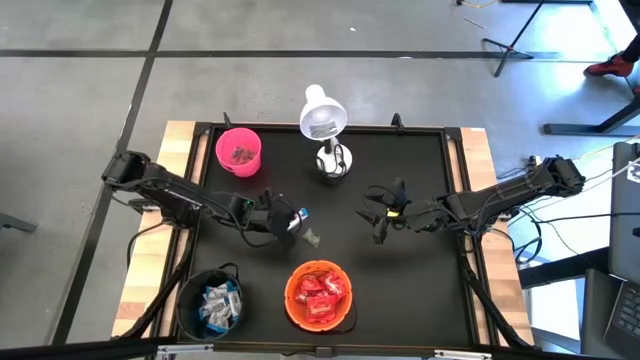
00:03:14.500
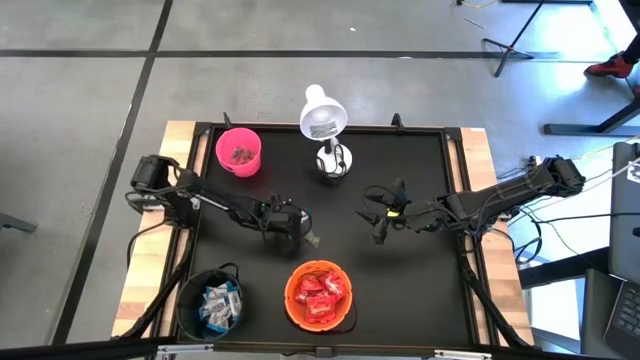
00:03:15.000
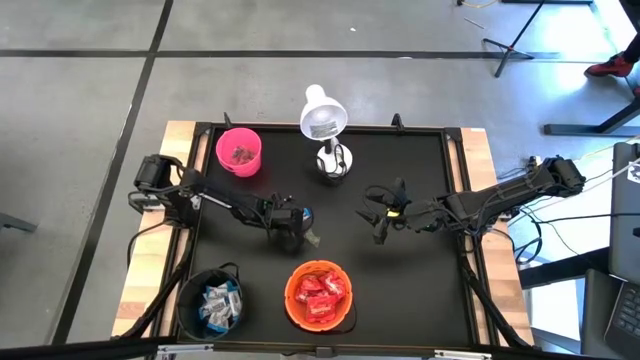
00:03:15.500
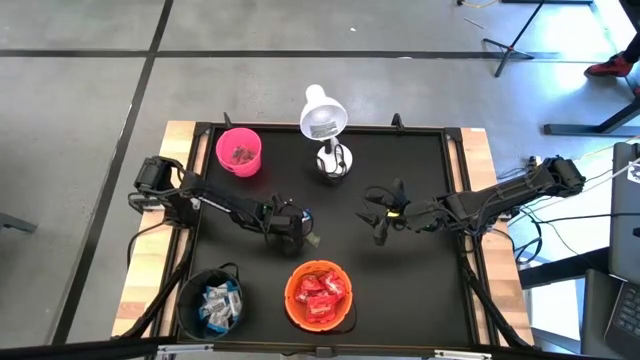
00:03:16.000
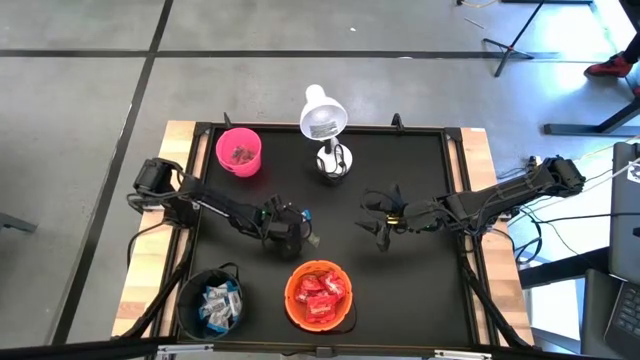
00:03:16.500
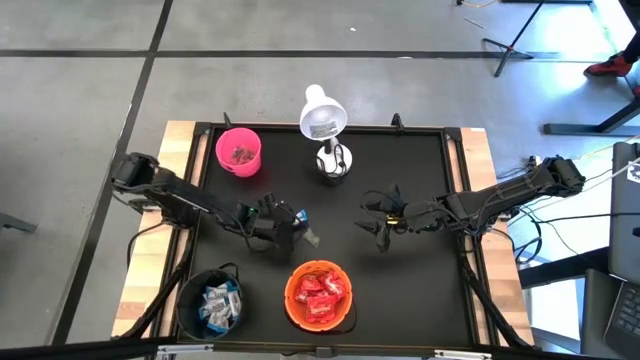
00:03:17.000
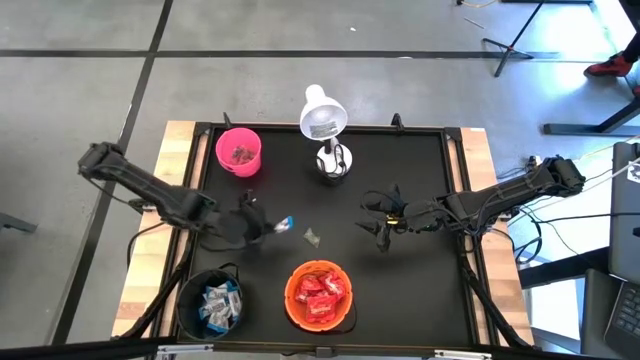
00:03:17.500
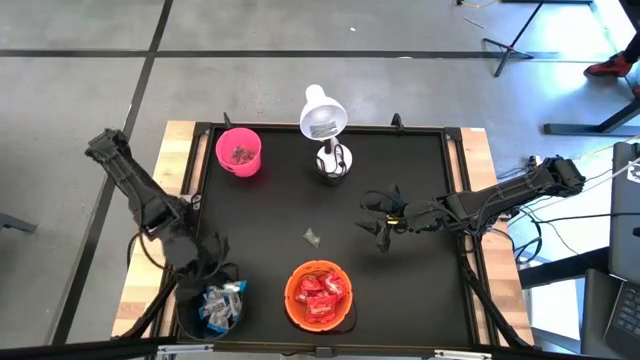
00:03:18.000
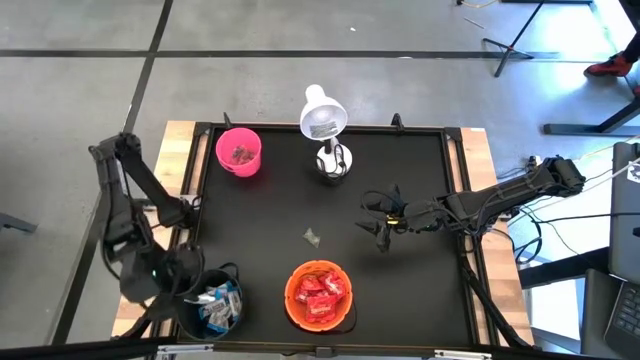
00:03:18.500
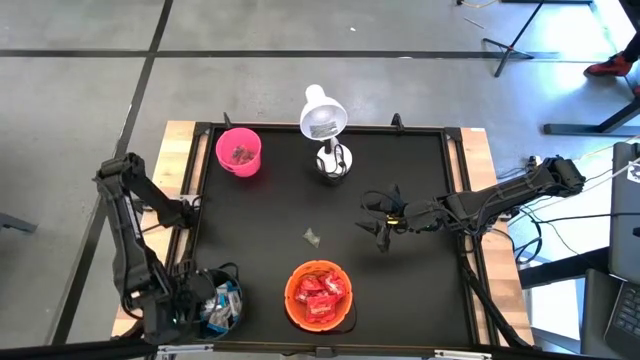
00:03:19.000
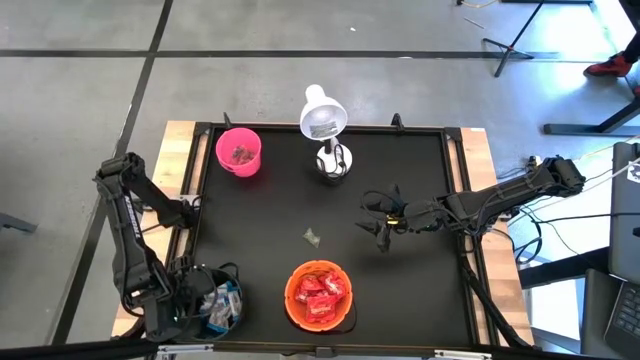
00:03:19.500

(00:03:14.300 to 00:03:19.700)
Task: Sort candy
Put the white candy into the black bucket

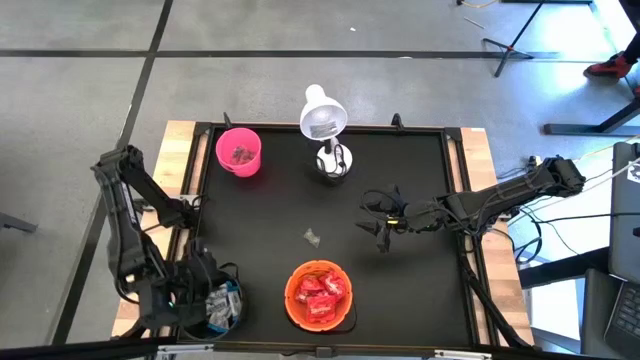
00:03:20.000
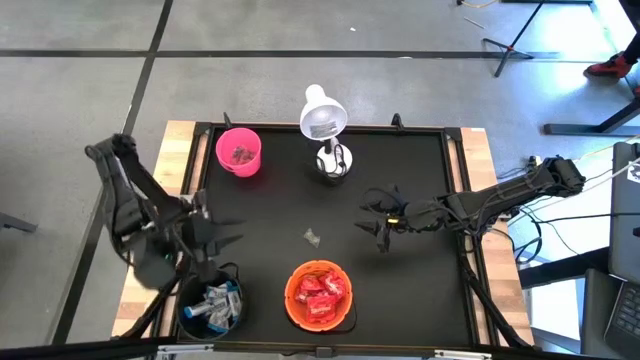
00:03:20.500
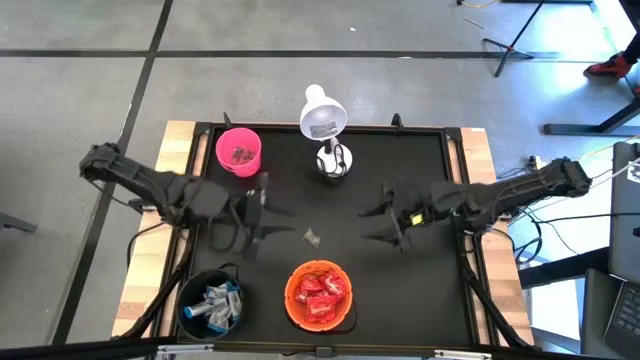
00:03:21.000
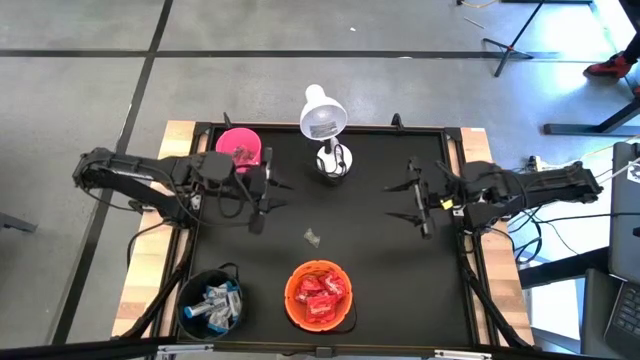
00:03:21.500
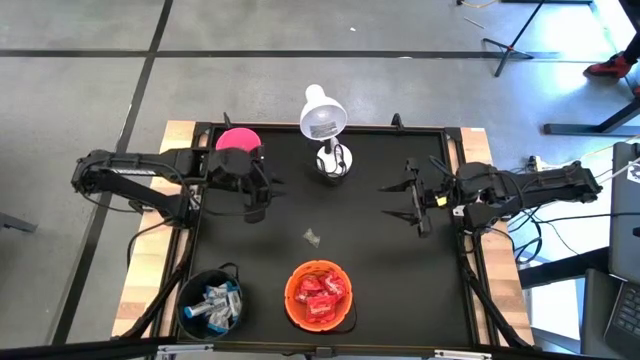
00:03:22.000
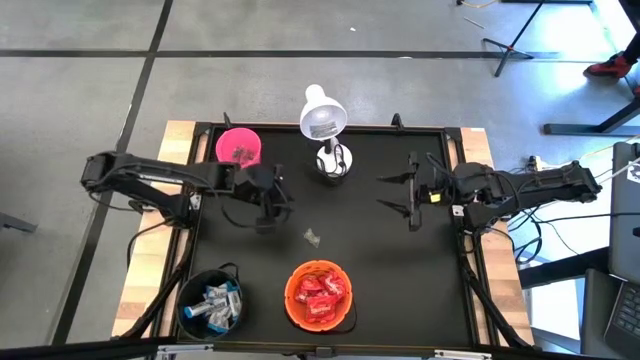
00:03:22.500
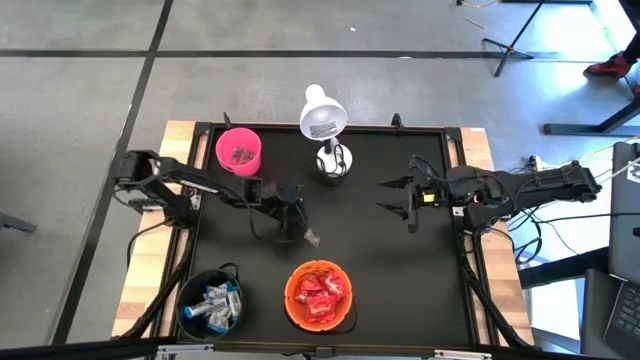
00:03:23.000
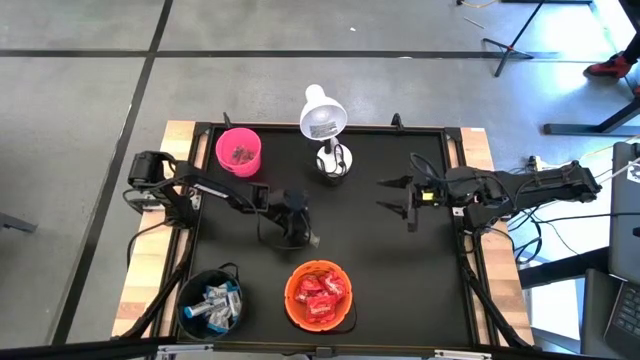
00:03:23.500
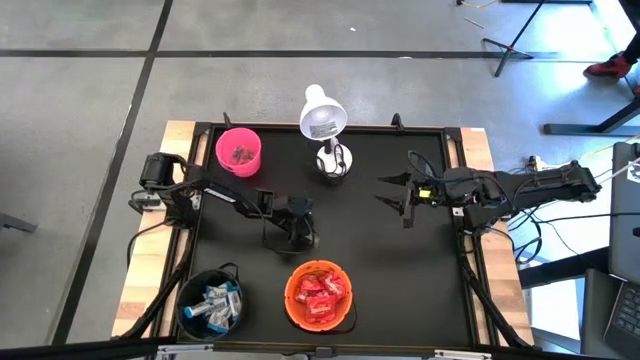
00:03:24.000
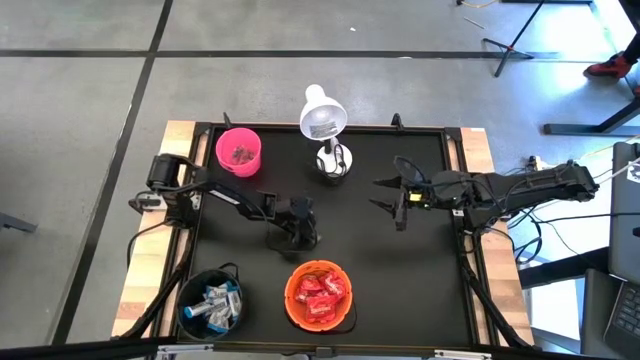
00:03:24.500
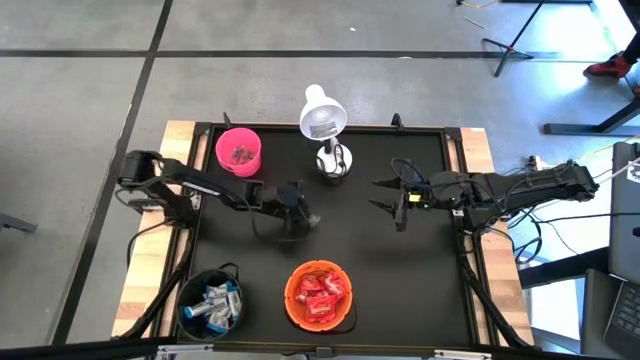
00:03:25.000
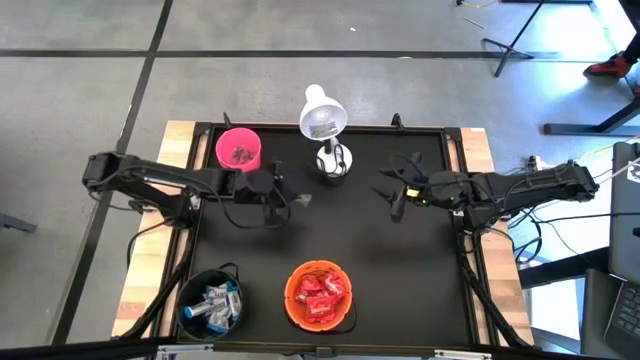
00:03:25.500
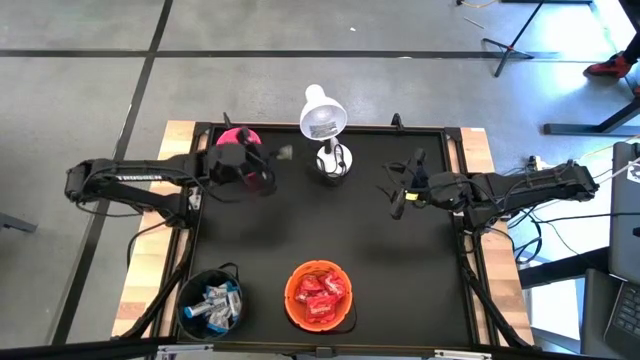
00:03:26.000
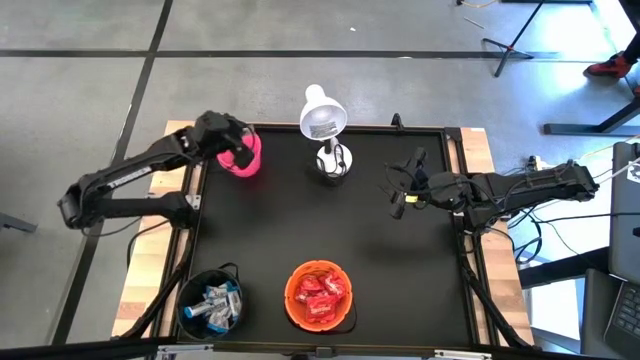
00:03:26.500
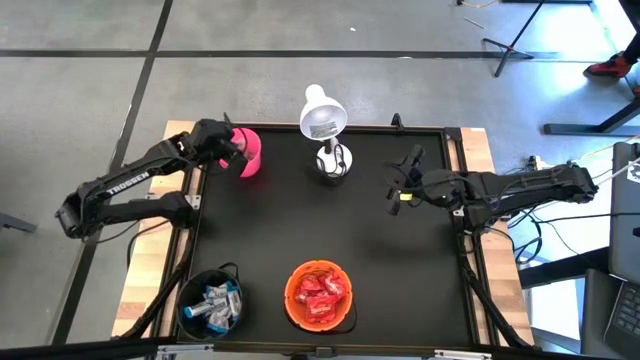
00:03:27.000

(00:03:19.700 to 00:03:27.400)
Put the green candy into the pink bucket

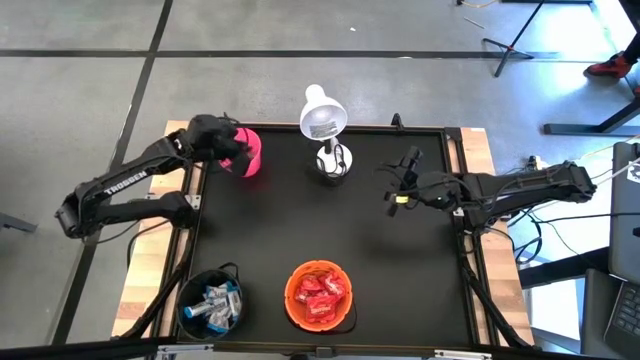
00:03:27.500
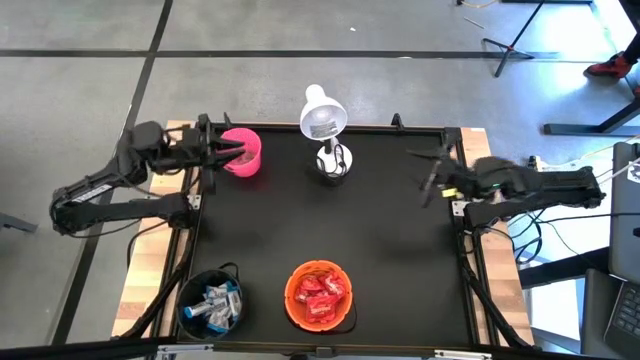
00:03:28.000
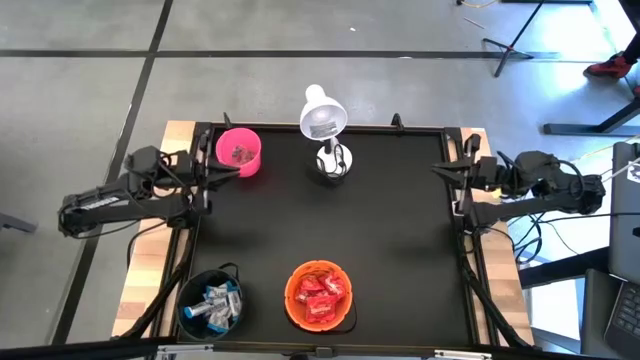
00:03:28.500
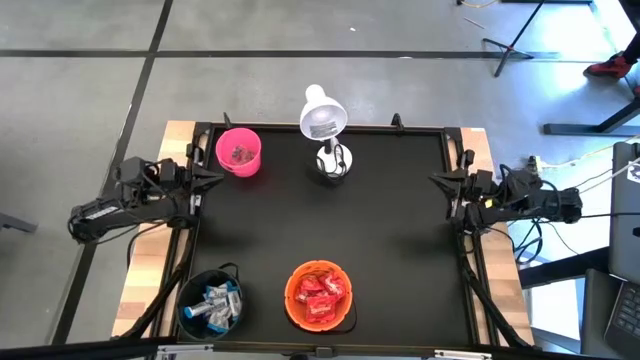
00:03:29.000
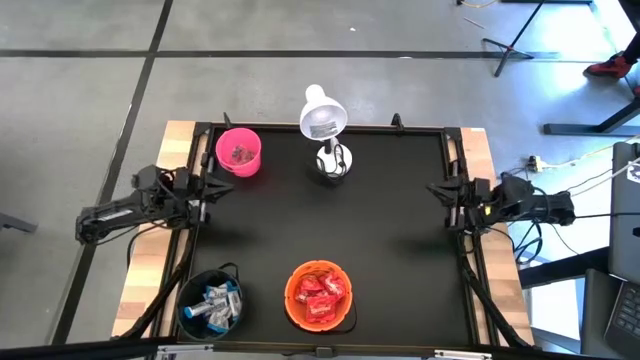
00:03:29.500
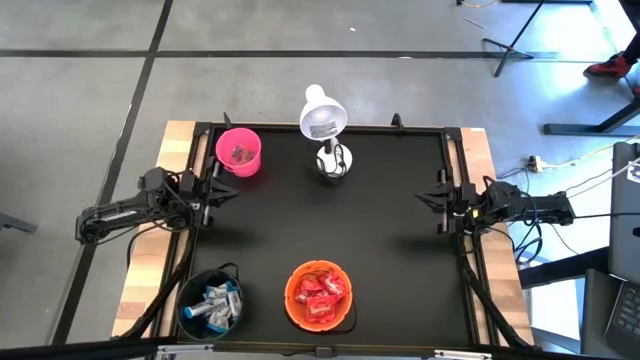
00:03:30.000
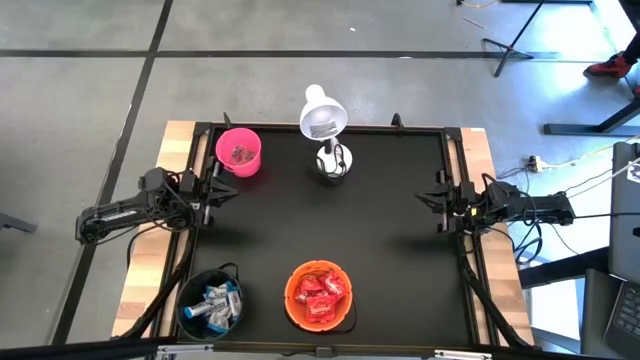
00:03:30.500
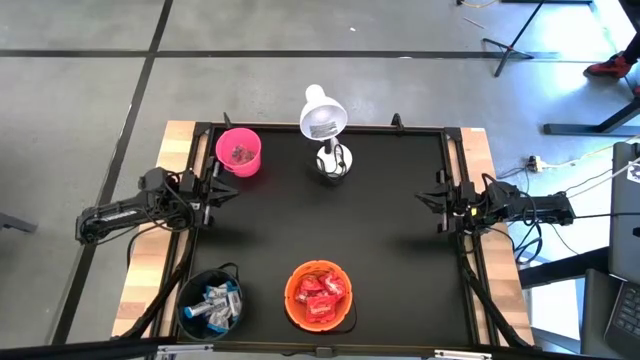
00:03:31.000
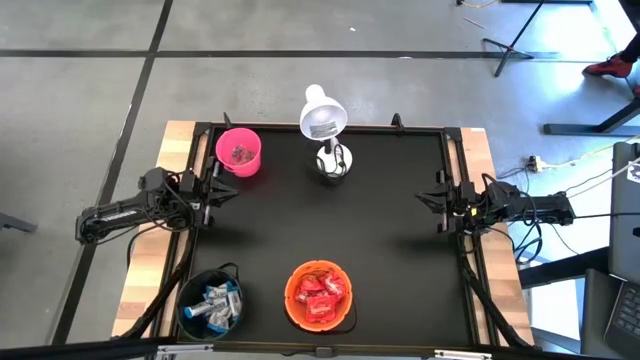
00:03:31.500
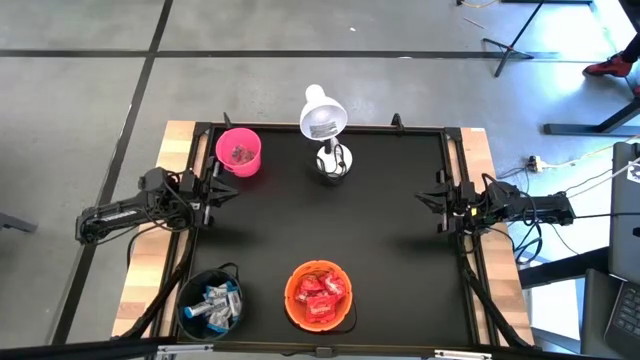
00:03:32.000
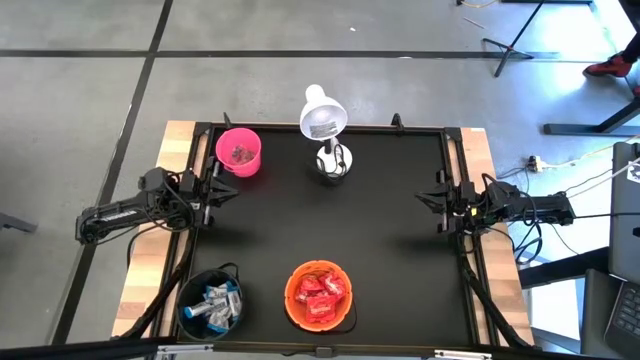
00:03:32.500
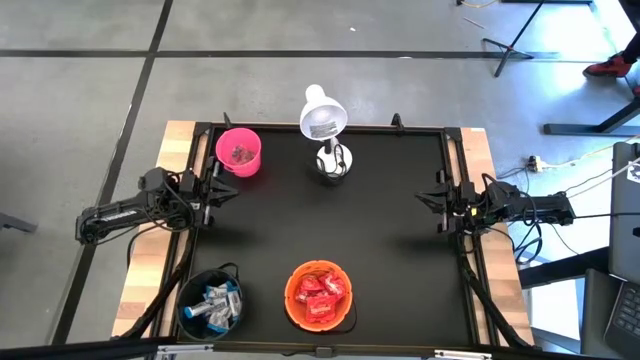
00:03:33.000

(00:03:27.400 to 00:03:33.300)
Return to Home Position

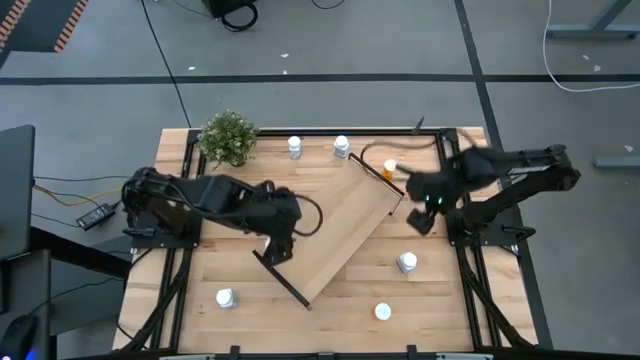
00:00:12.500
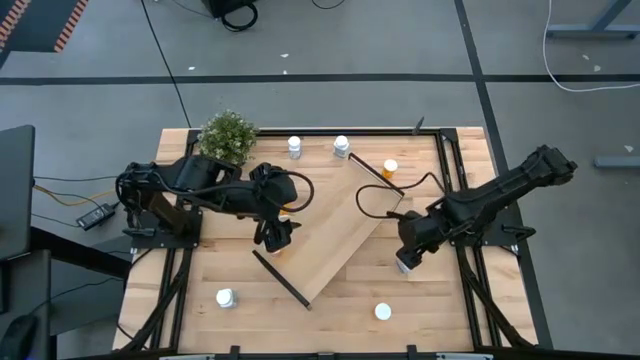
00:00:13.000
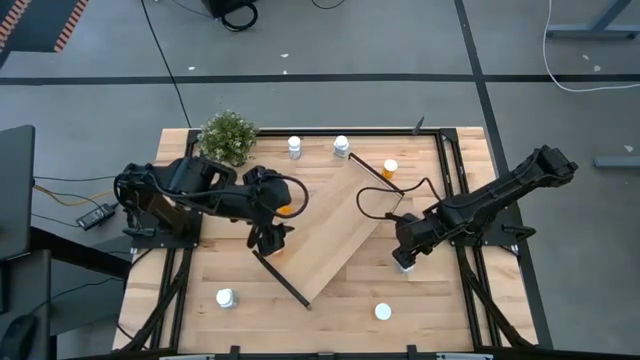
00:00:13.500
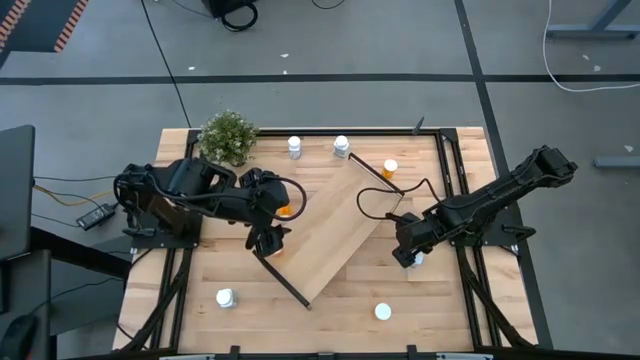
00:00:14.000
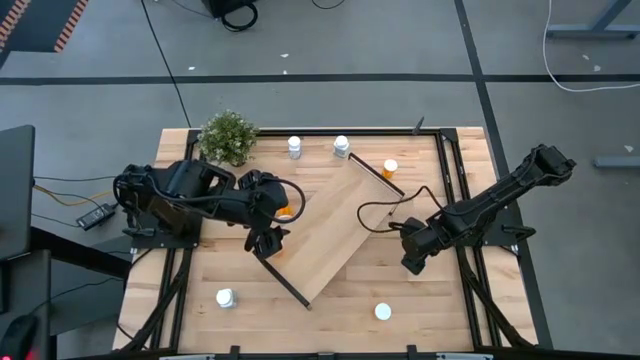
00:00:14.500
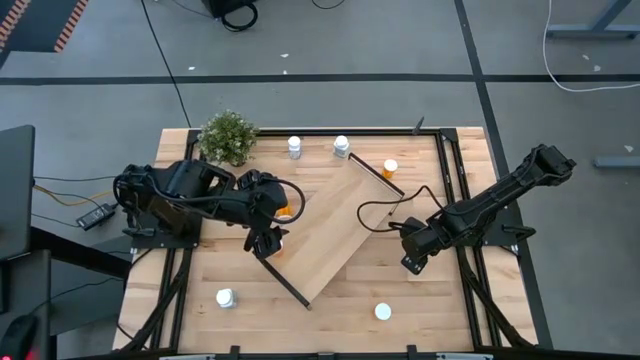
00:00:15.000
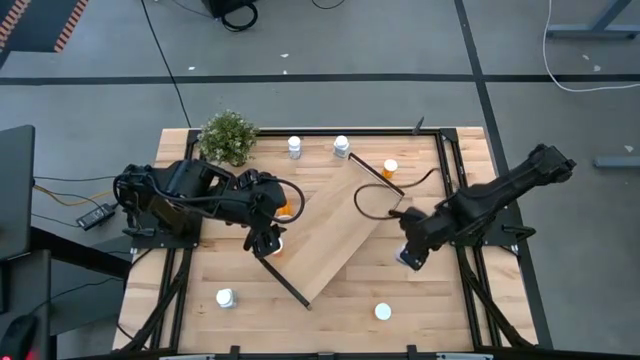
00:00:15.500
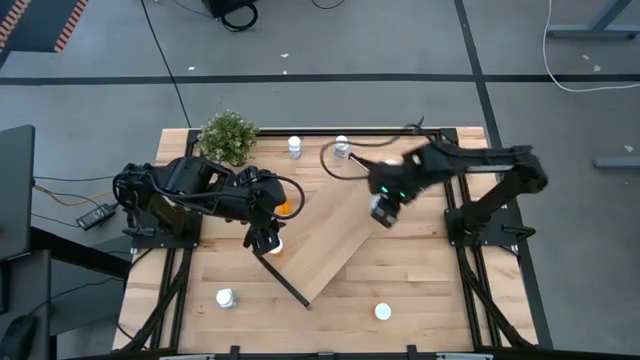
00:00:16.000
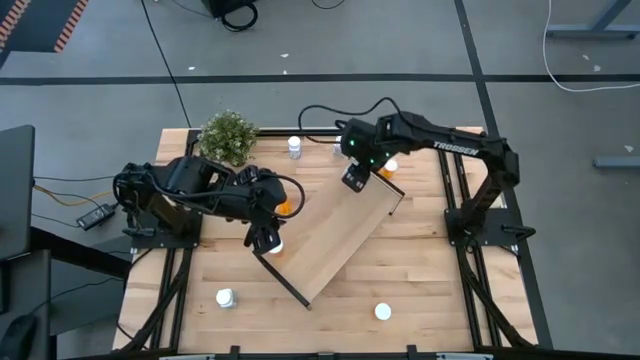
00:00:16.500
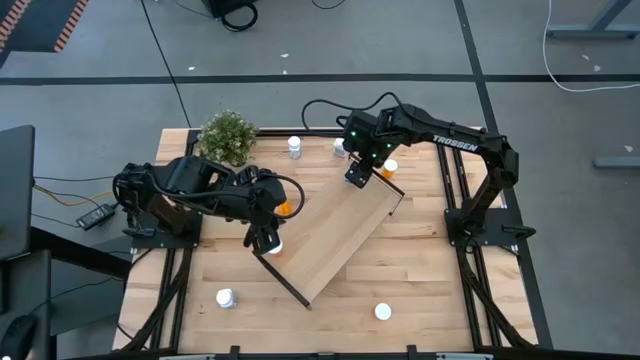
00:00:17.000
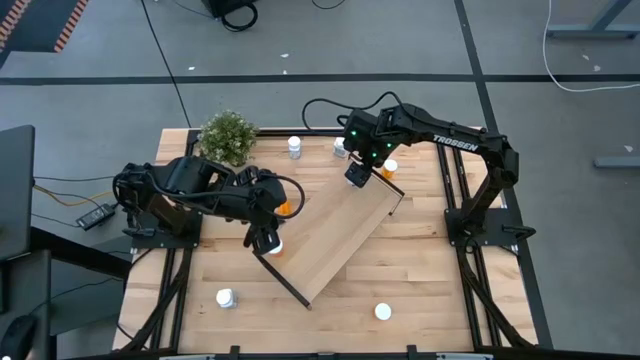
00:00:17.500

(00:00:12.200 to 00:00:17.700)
Task: Pick and place medicine bottles onto shelf by color
Put the right white pill bottle on the shelf
